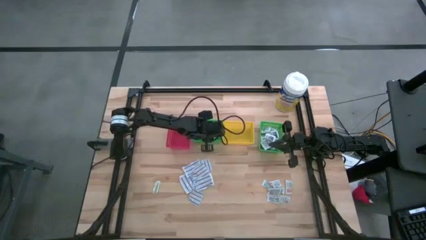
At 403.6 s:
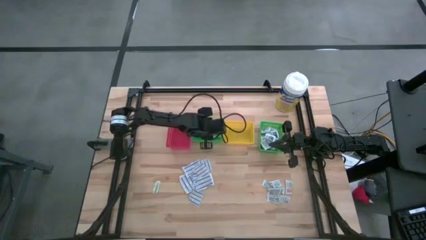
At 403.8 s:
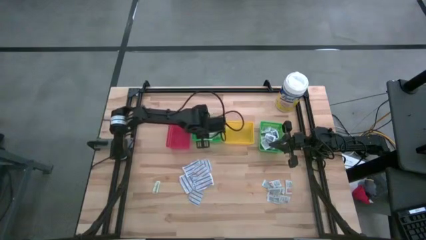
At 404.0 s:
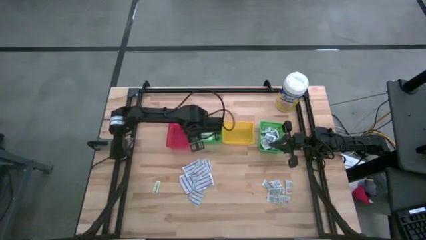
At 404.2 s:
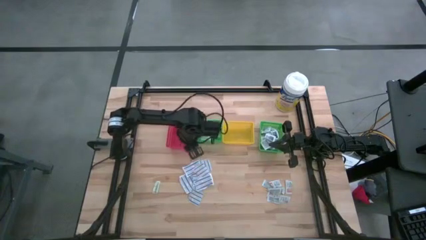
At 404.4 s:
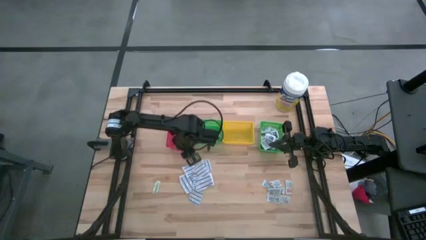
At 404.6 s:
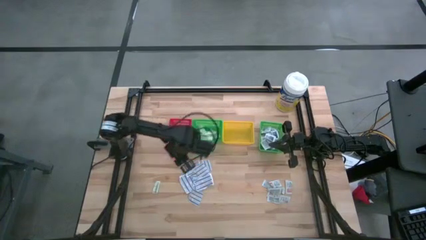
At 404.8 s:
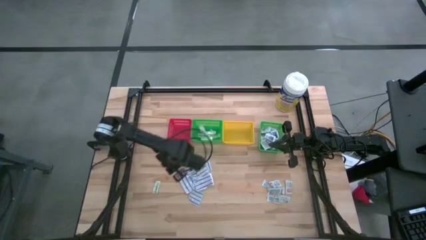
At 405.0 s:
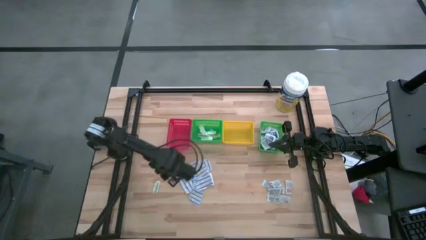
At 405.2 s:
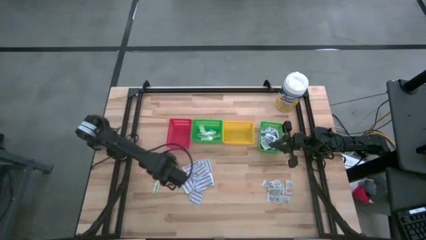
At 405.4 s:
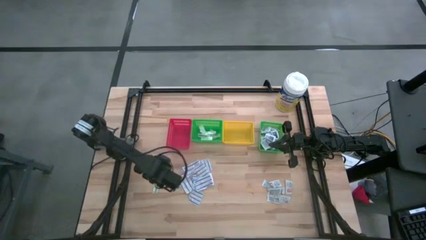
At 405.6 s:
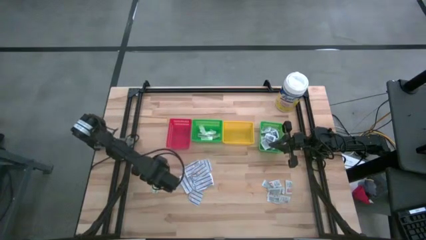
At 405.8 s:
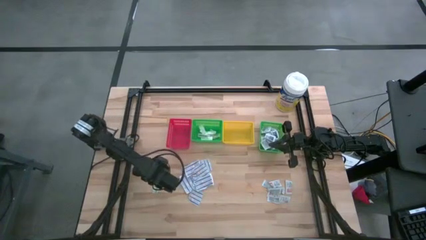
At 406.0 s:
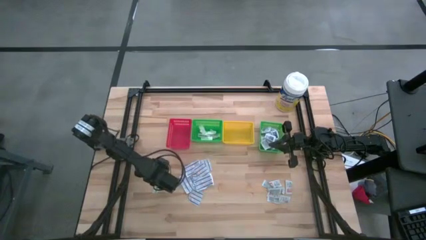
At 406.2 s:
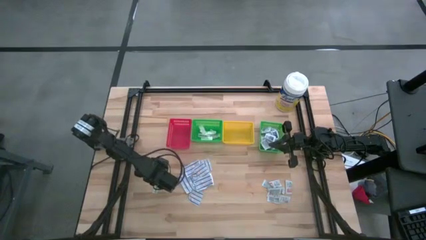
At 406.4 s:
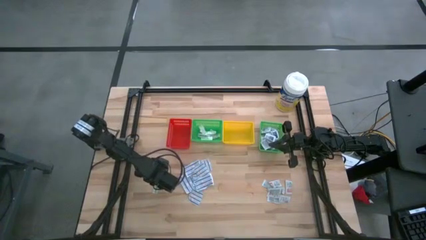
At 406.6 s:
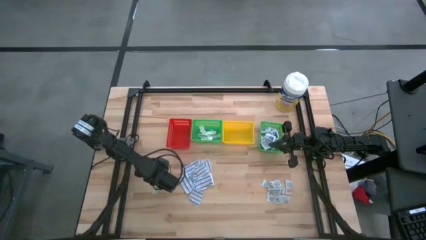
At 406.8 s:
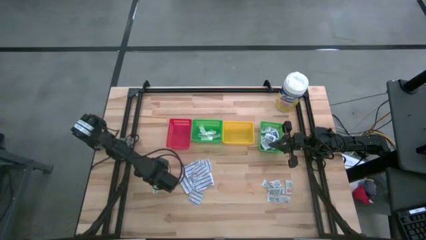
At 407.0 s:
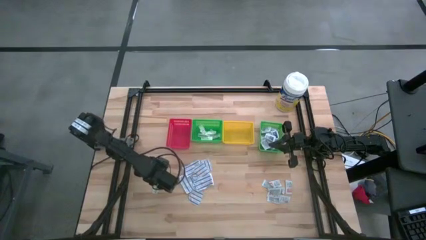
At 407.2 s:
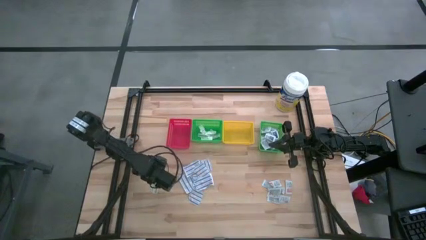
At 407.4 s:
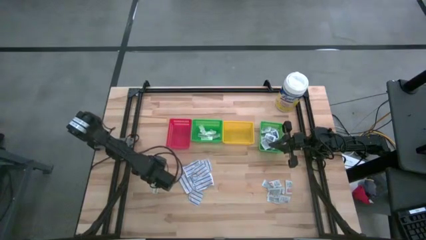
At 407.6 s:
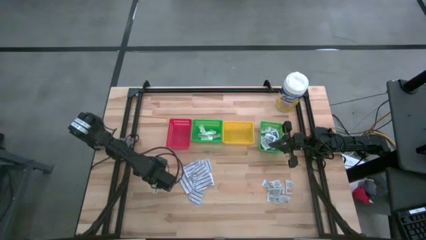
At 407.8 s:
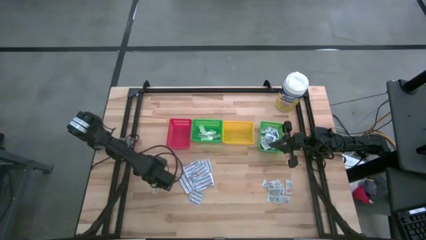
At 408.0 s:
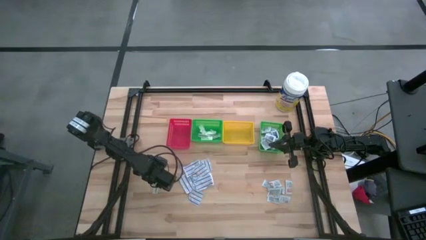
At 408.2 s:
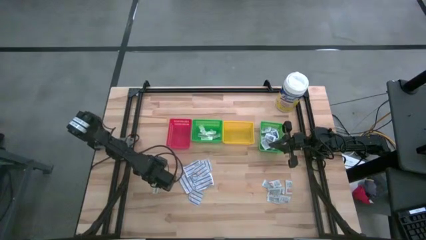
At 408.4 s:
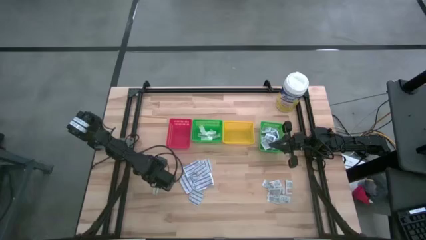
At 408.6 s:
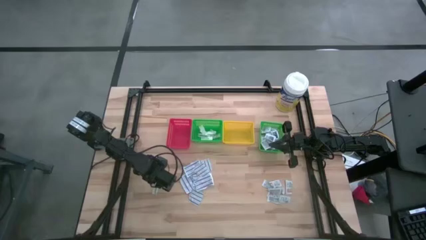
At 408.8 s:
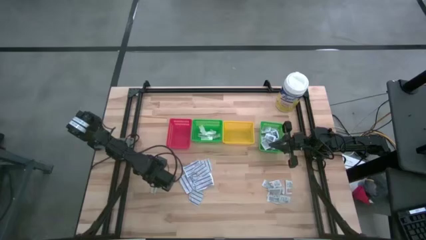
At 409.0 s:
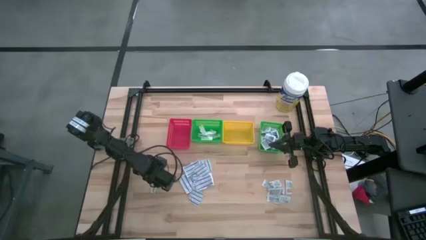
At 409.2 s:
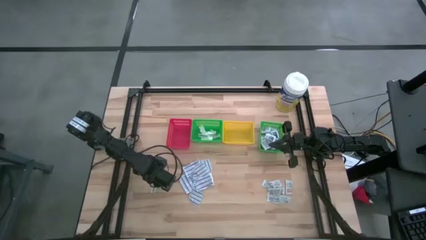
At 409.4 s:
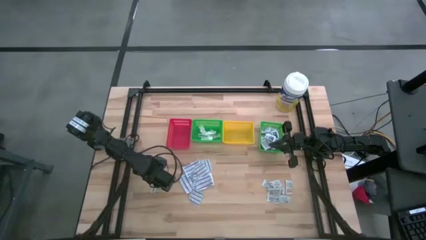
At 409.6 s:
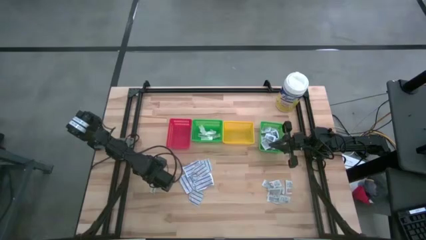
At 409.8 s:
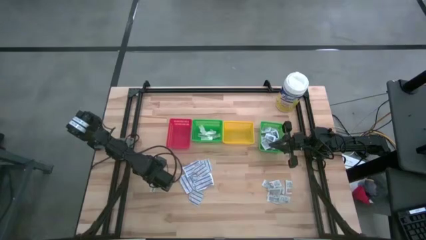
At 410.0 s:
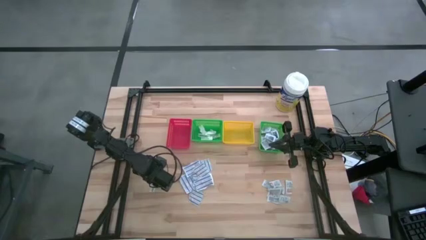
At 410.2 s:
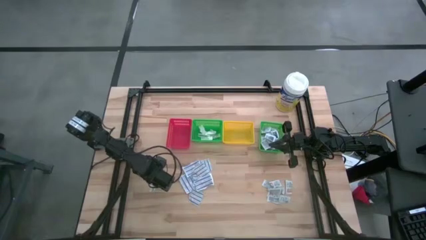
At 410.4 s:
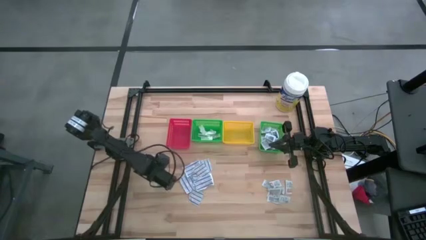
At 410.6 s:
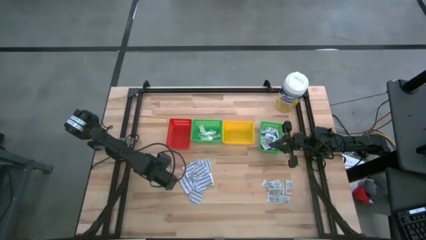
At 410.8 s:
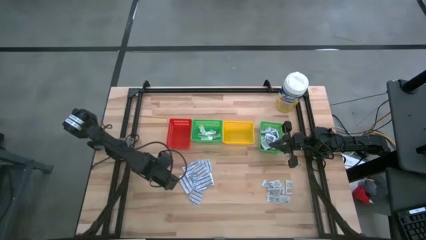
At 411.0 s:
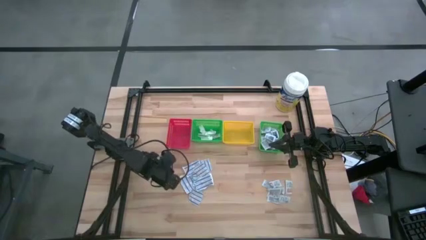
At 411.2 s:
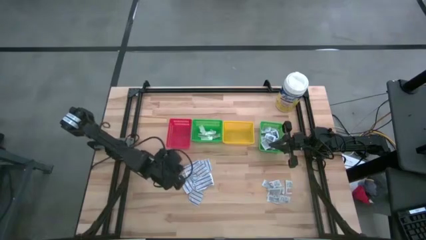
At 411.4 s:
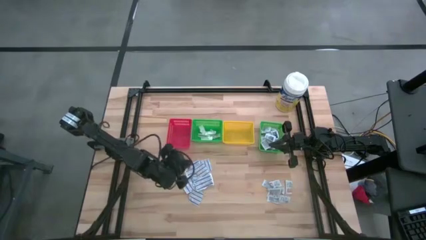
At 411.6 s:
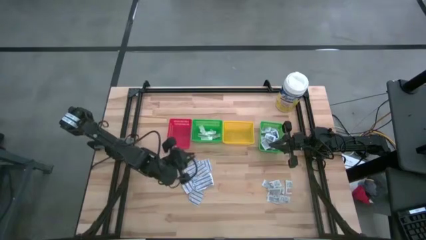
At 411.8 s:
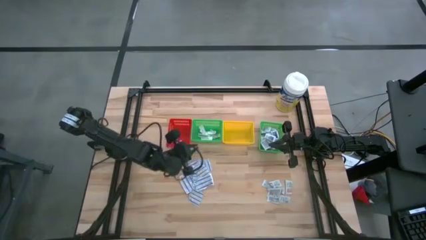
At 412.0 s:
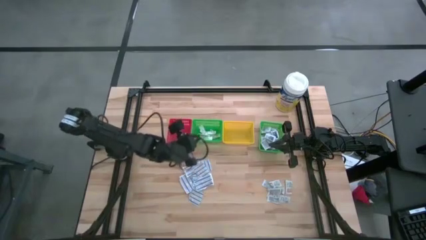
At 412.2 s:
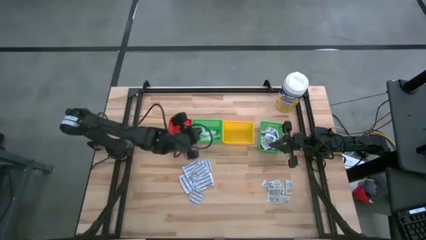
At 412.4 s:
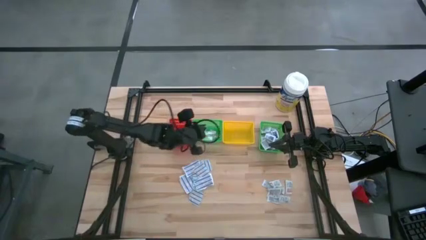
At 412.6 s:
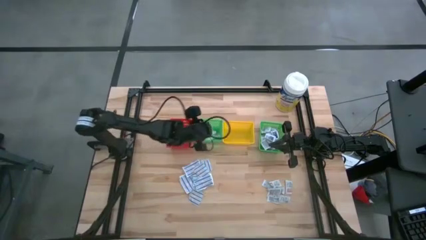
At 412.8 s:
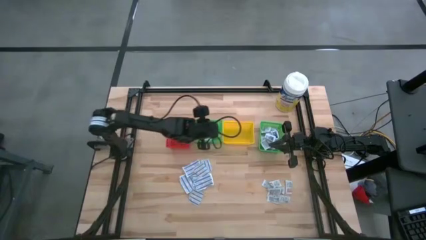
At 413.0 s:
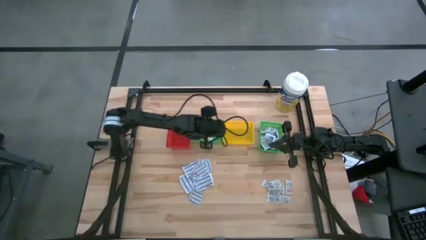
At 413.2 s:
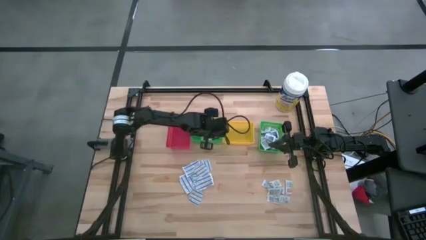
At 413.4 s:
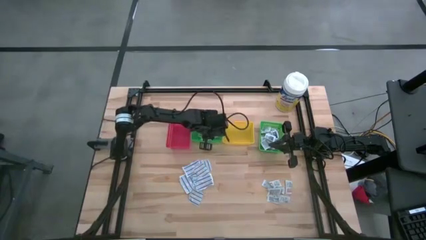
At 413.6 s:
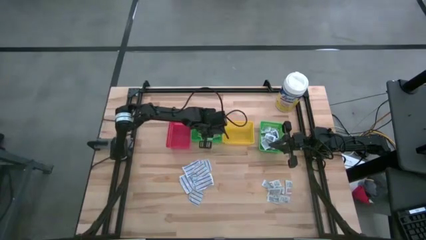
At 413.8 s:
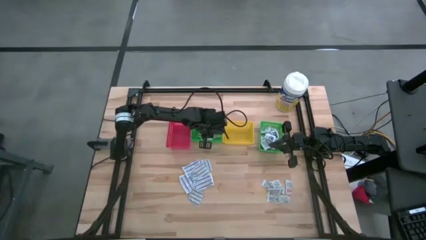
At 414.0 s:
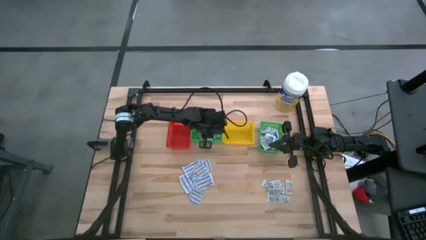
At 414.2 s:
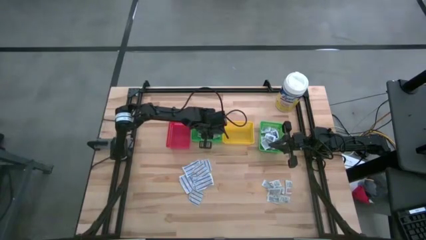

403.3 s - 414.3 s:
Task: Pick & Place First Aid Supplies
Put the green bandage into the left green bin

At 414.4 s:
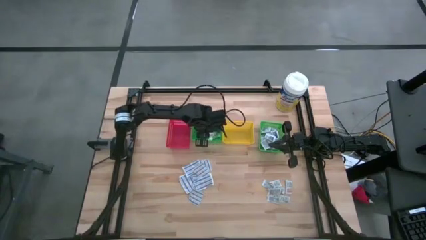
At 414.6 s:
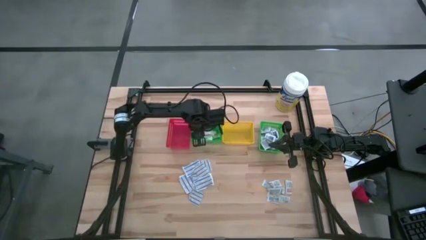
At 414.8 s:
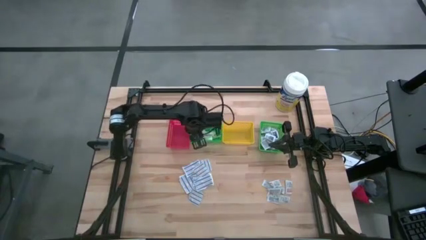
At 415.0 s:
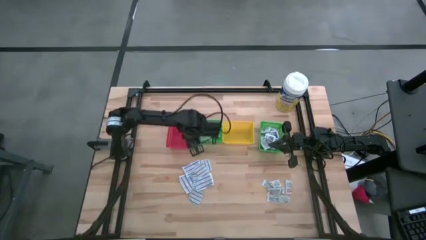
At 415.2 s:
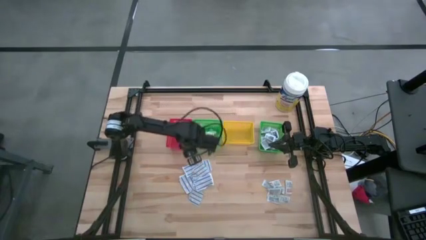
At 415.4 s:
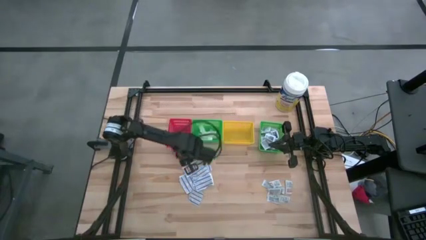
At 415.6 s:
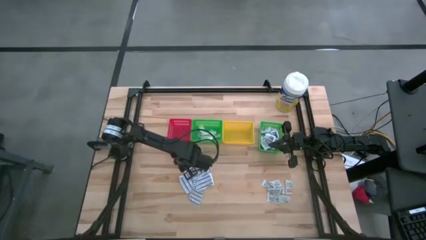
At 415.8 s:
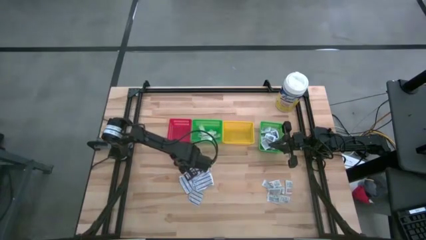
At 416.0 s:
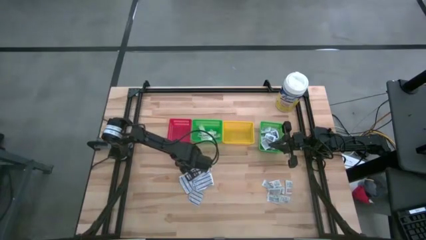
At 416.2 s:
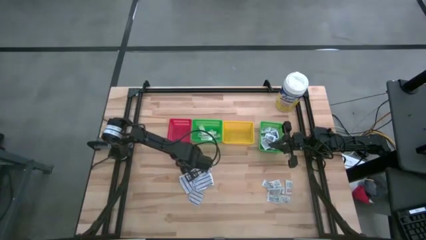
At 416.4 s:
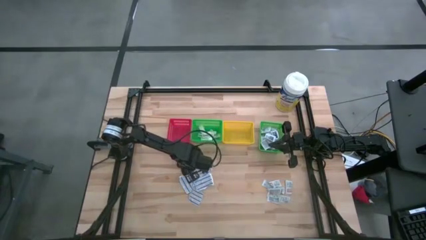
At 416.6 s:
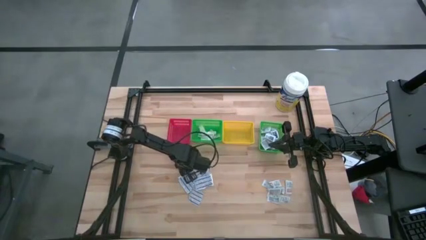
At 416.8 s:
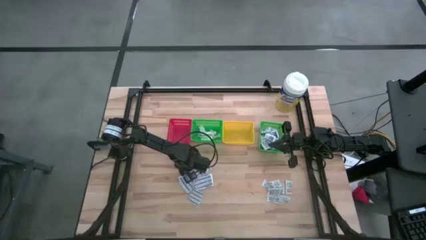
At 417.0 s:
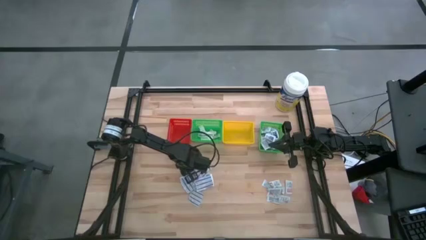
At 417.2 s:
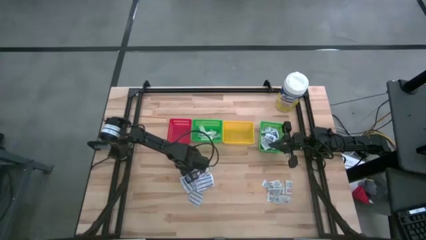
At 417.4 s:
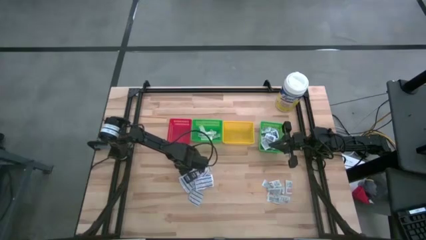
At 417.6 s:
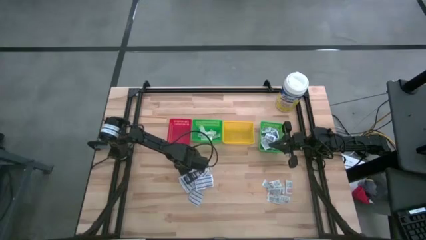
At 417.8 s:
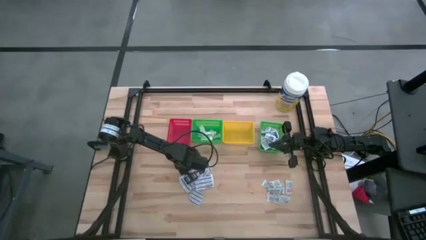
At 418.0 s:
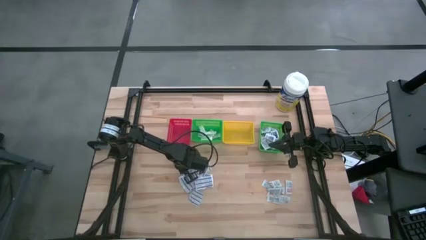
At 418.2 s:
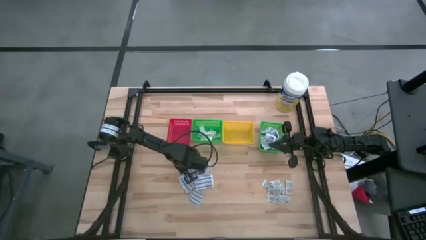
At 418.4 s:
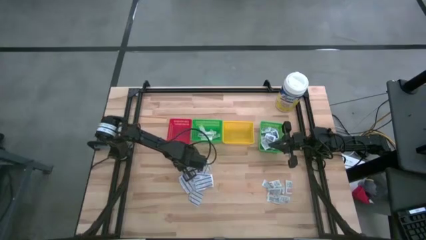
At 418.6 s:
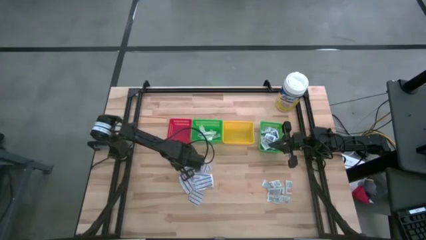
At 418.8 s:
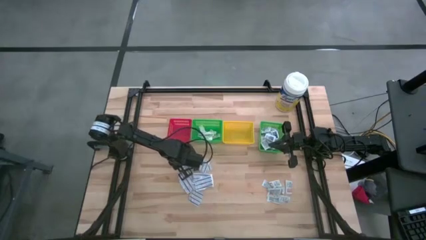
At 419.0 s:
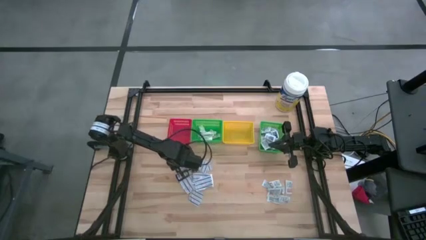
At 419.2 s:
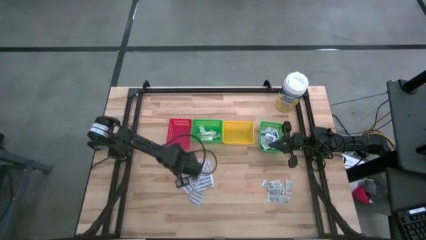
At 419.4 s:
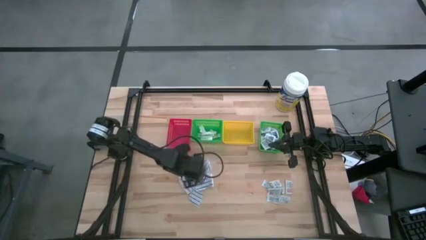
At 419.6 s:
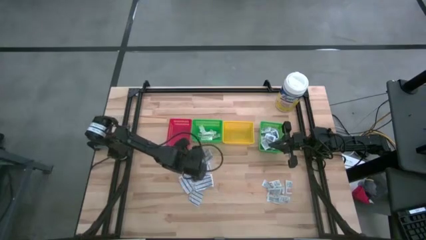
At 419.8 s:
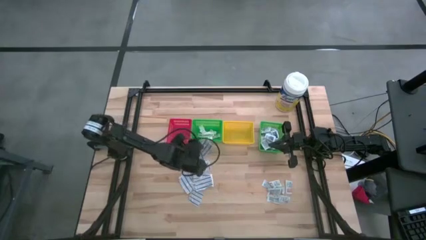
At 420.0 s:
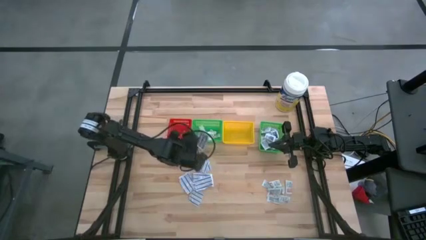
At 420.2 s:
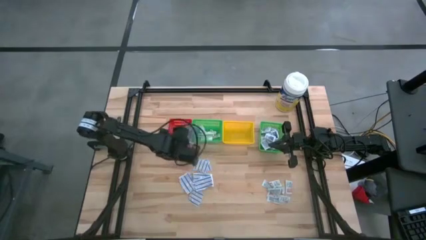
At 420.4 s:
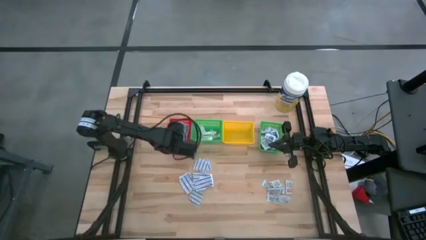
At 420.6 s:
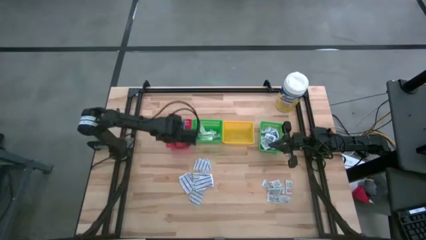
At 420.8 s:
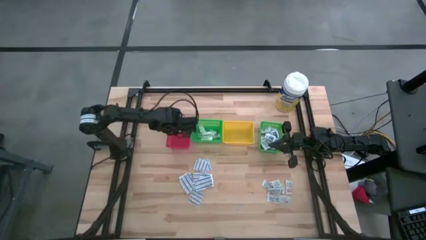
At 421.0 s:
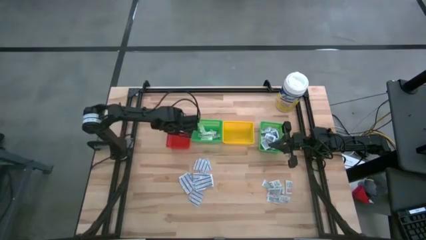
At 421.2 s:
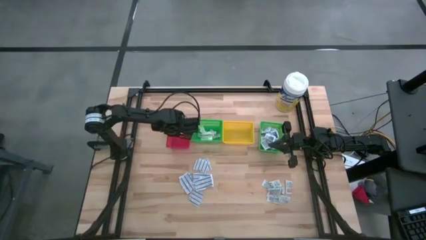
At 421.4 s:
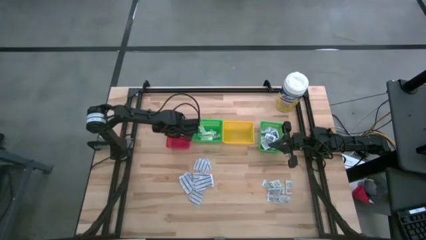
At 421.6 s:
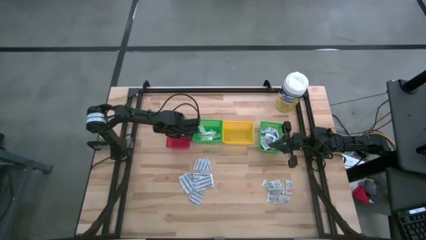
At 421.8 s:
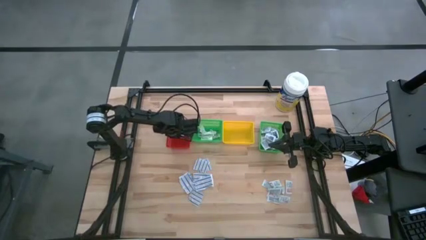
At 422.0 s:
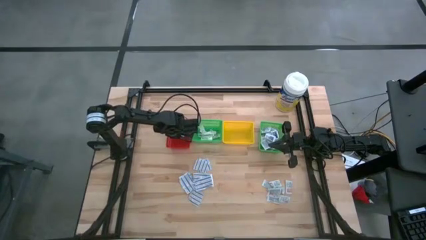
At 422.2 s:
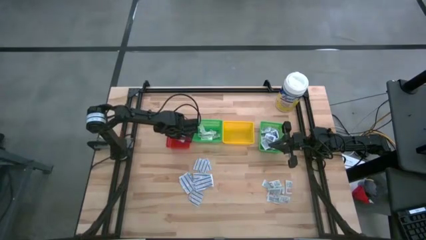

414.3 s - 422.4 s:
Put the blue bandage into the red bin
